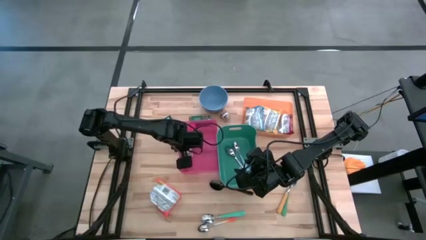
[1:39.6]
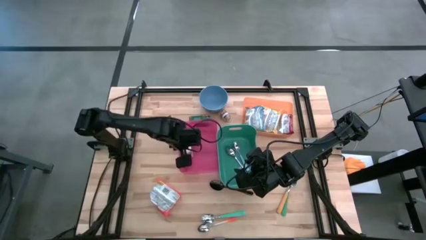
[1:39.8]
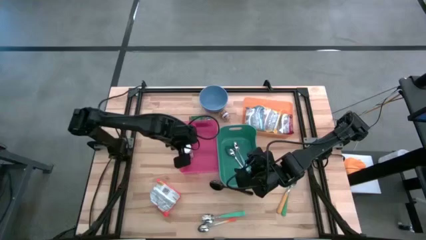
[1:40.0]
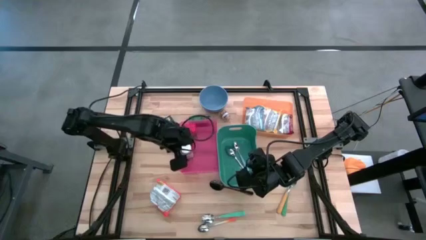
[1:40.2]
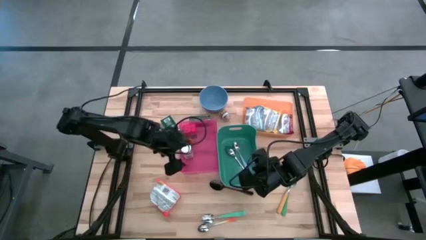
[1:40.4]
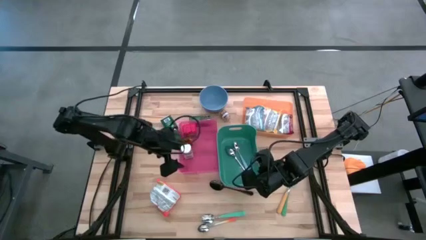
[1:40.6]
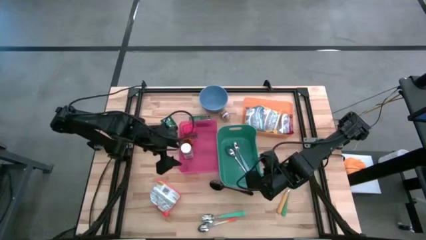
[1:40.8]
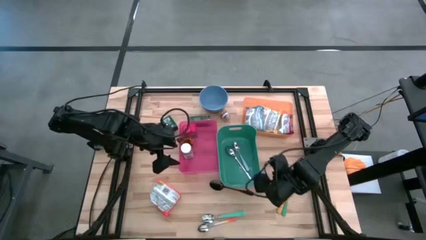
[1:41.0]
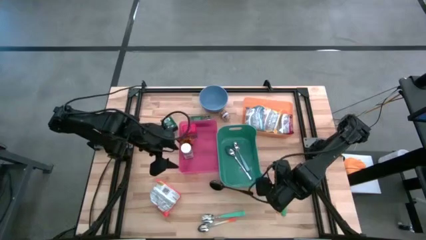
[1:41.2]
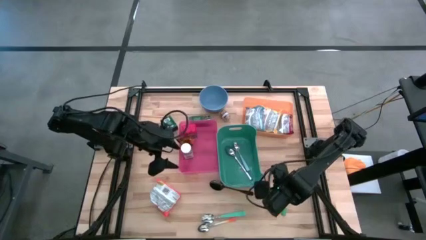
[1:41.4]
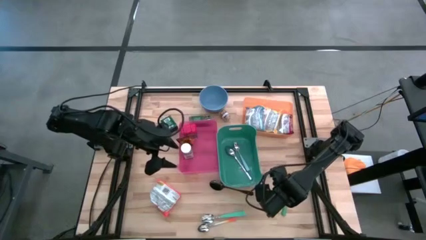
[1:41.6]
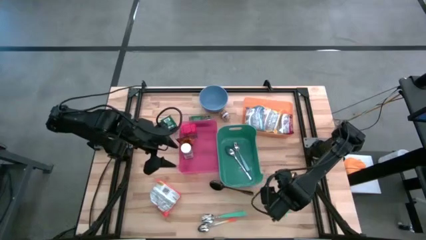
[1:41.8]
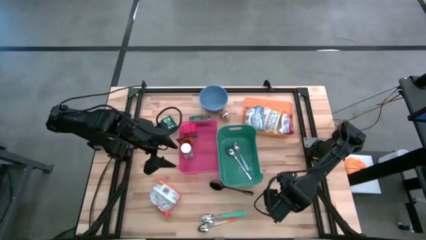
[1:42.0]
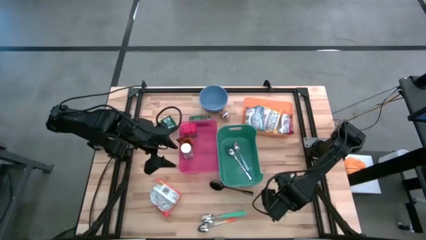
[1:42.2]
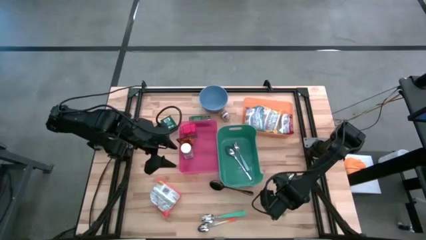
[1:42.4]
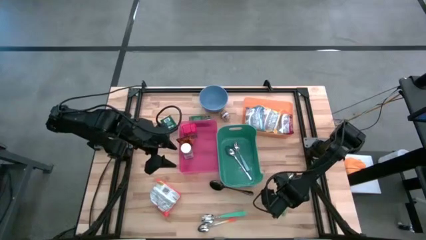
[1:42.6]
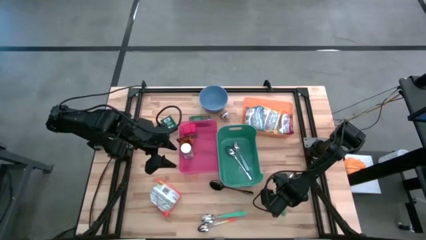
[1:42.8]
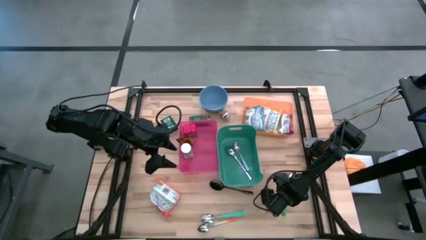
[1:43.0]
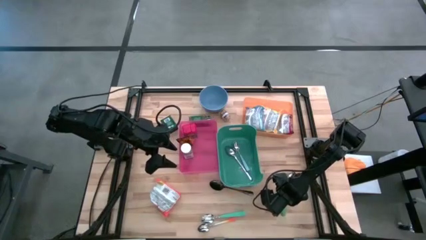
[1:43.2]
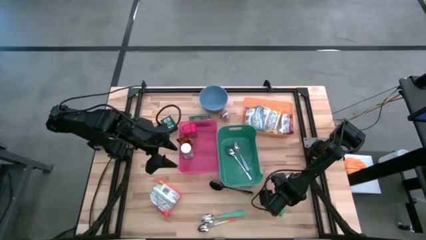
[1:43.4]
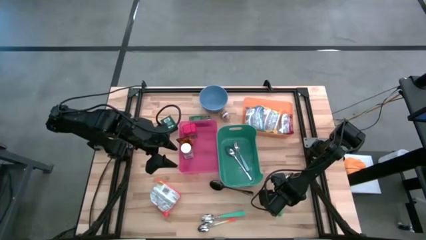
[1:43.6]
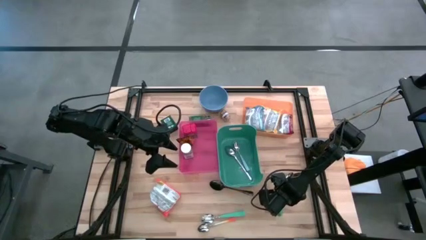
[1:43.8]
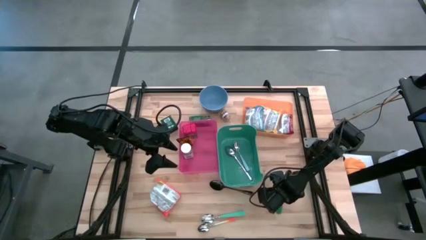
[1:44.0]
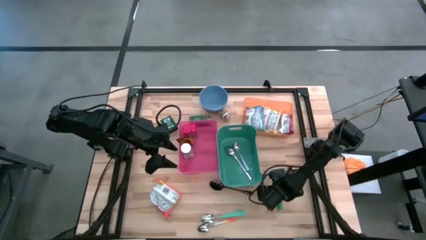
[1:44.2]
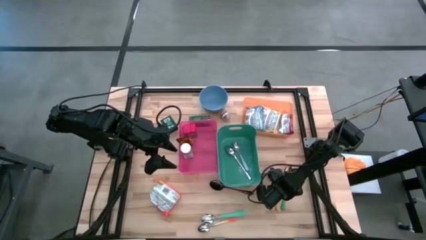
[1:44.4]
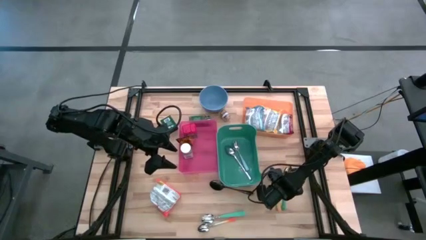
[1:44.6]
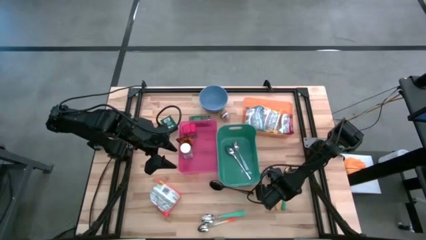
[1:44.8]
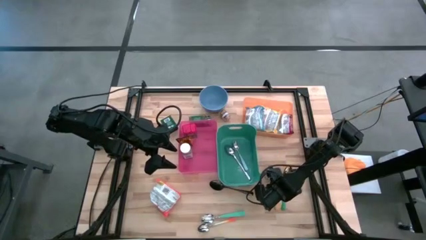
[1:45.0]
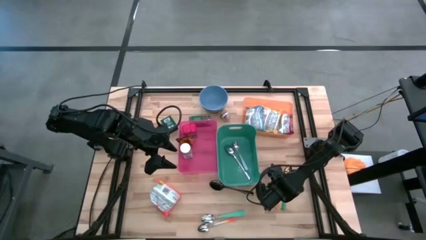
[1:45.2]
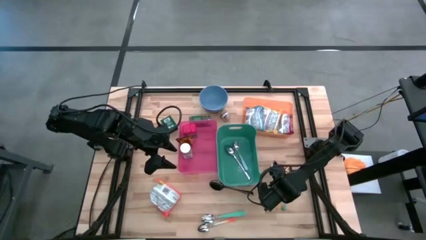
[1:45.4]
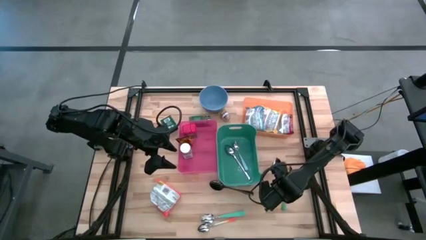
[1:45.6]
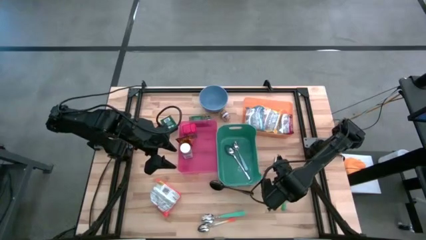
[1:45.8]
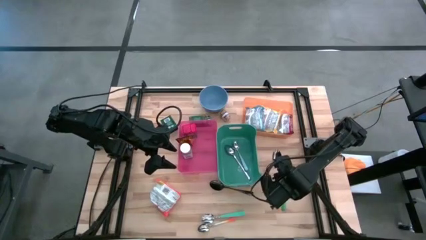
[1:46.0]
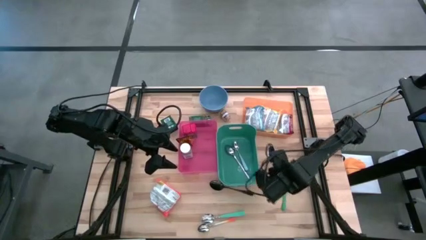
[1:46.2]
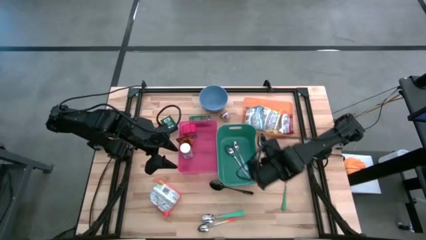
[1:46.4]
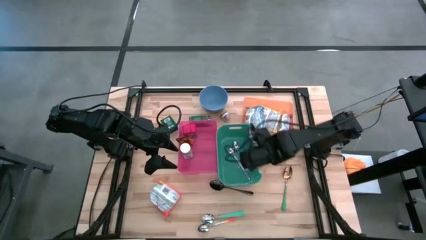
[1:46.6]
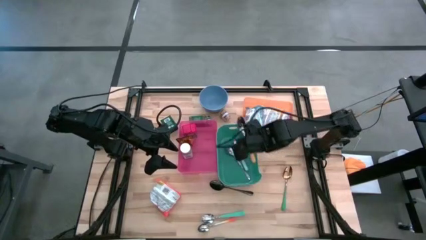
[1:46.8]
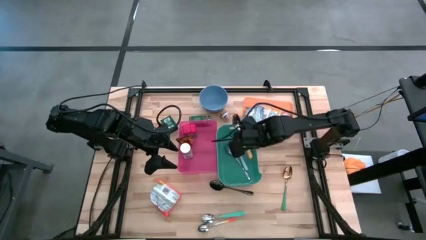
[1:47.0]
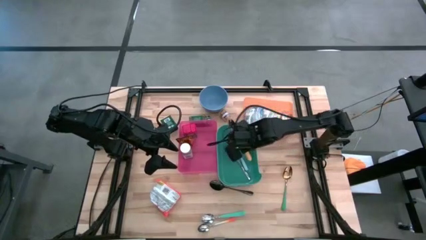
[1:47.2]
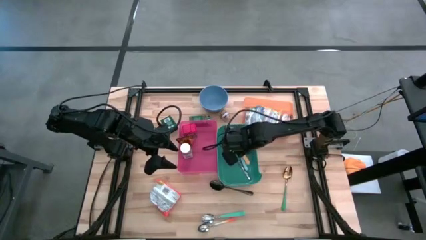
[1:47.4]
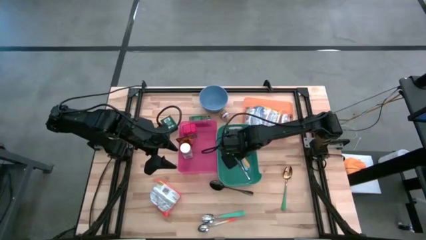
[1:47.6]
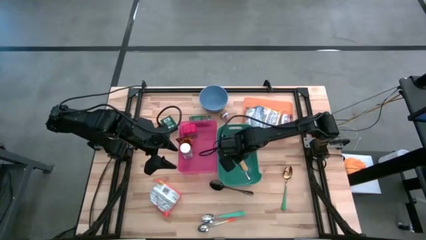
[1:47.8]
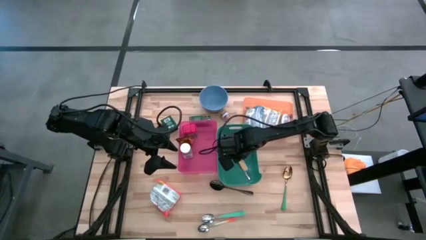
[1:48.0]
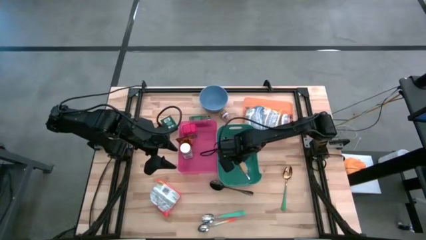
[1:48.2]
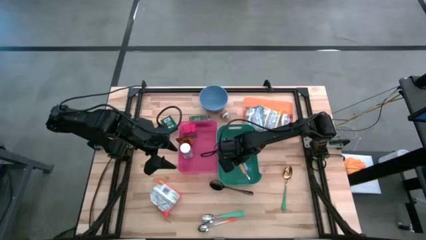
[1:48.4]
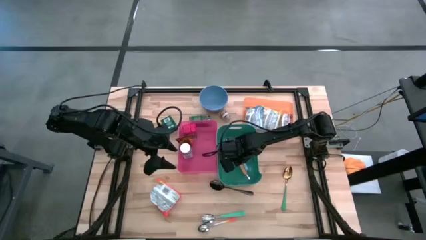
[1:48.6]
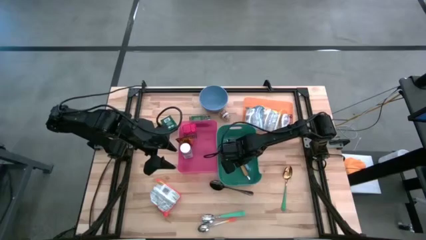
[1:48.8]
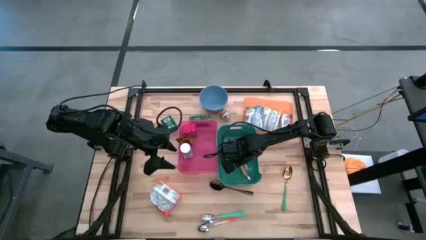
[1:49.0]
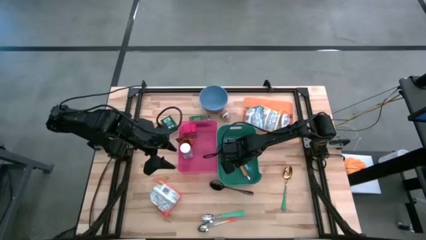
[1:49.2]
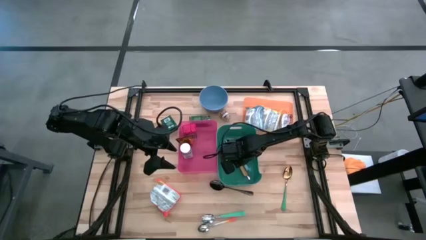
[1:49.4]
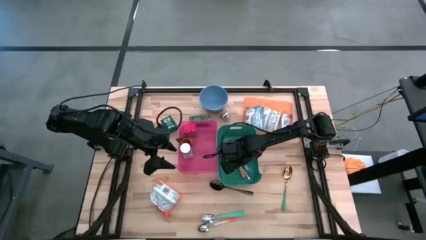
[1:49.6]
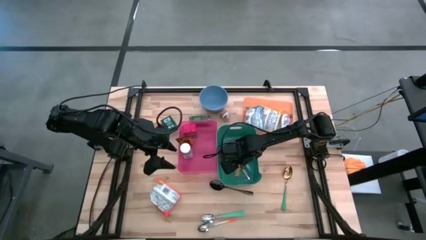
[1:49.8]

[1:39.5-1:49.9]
Put the yellow spoon into the green bin

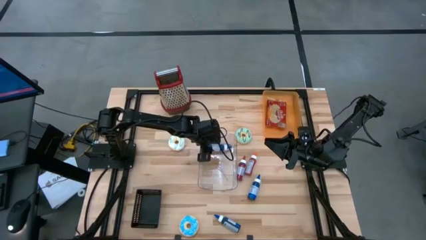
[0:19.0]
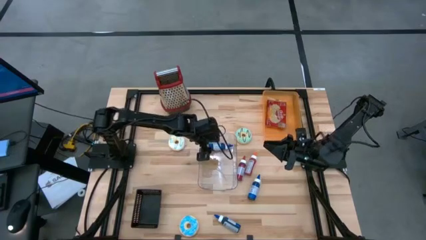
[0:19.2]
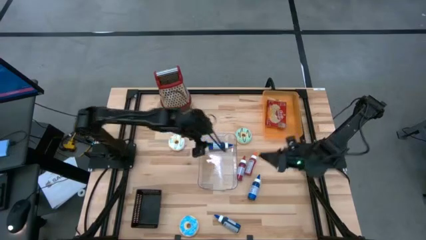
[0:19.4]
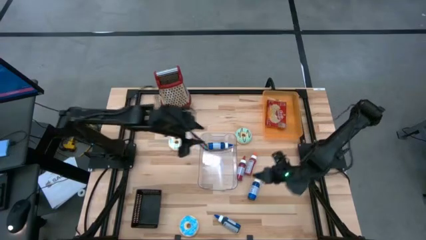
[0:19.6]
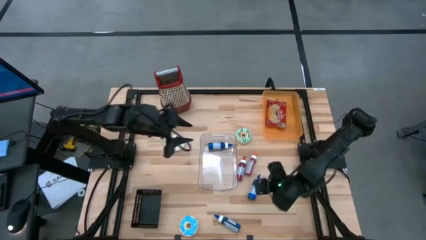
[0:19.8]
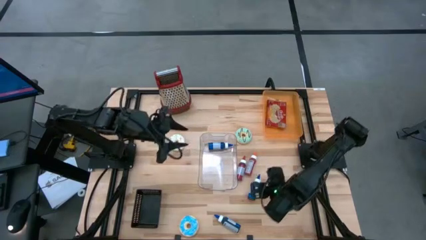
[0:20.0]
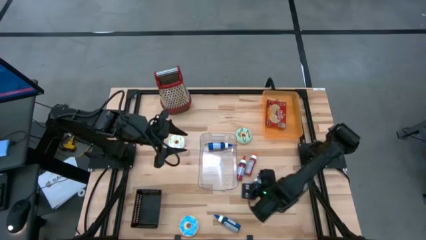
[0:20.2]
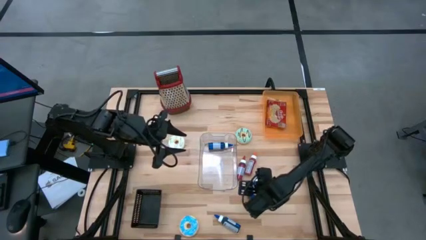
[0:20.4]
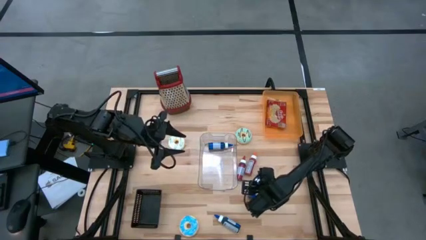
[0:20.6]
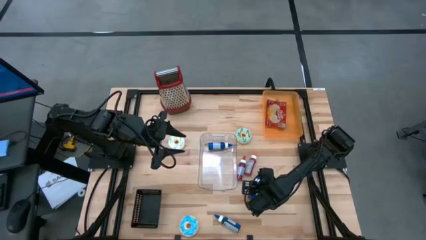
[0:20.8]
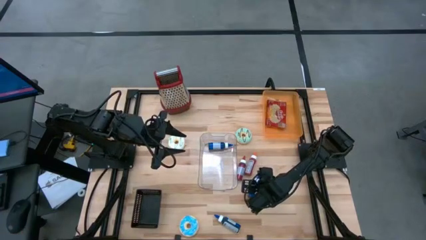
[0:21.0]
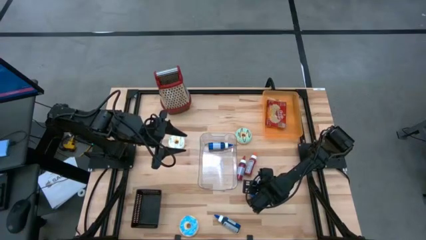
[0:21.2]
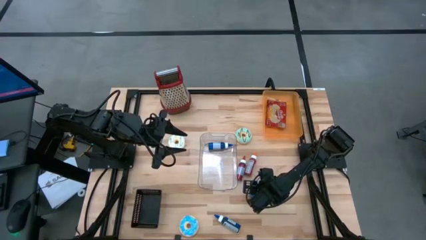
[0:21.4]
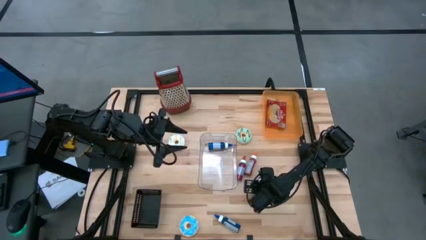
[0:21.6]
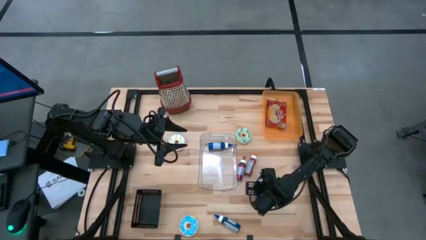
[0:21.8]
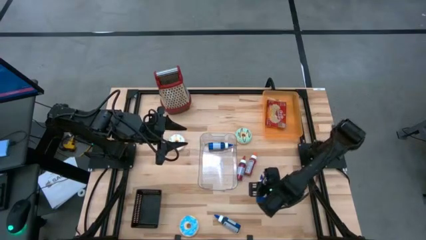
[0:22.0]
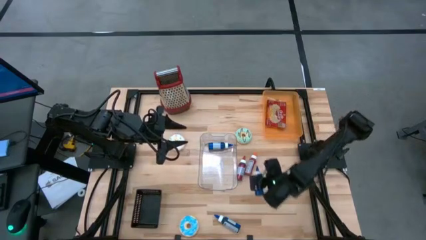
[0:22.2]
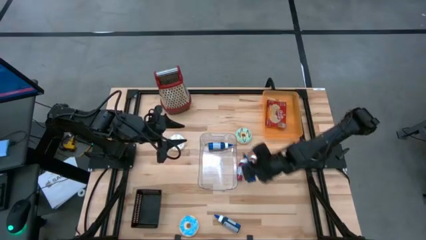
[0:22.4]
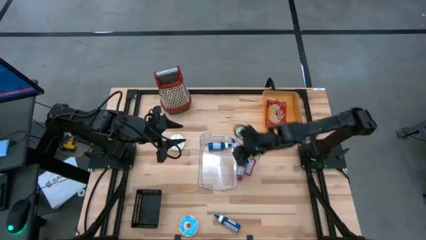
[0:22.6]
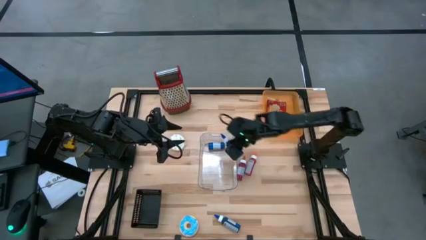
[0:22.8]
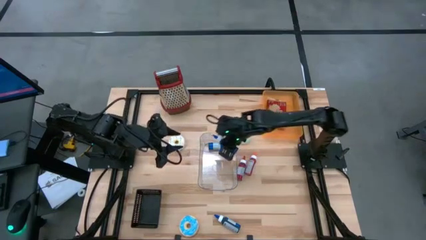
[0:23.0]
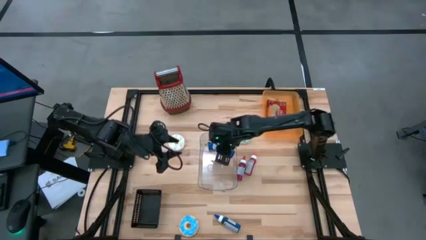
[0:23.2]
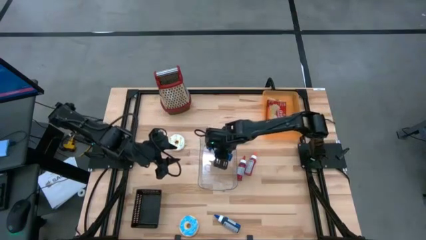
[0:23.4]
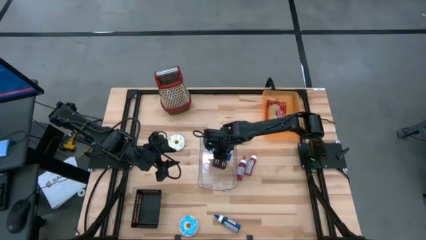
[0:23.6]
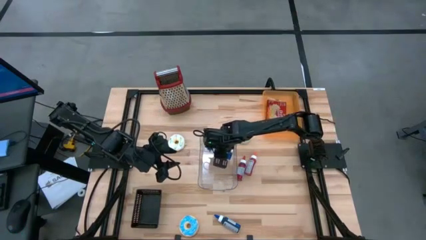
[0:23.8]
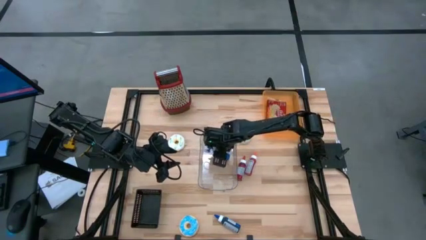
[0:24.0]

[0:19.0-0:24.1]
Put the top blue food coloring bottle into the transparent bin

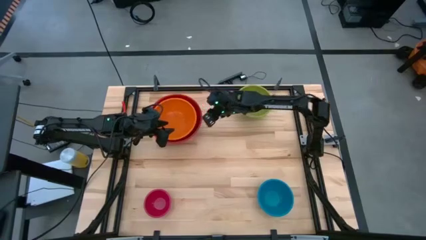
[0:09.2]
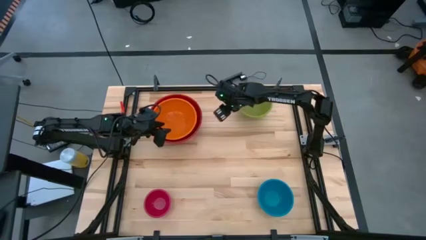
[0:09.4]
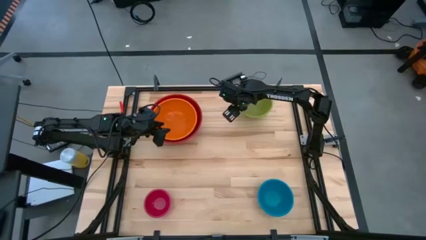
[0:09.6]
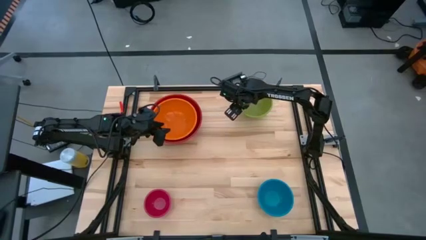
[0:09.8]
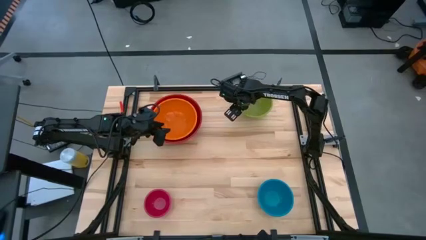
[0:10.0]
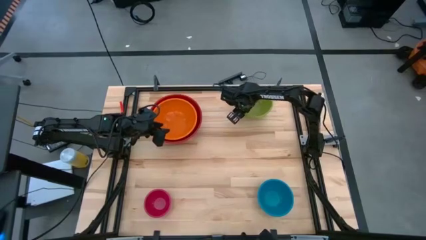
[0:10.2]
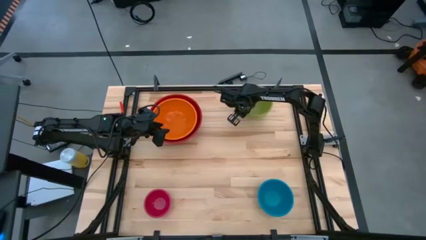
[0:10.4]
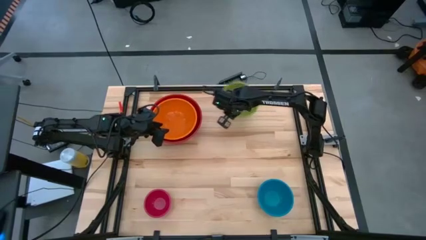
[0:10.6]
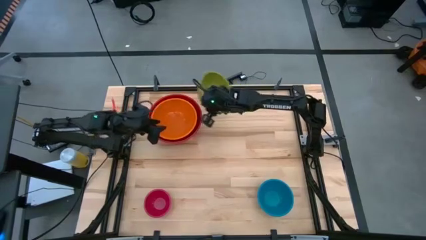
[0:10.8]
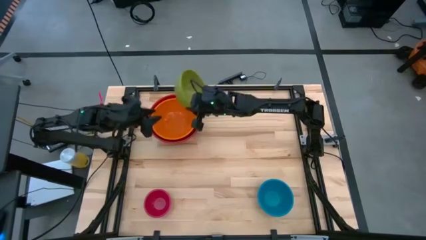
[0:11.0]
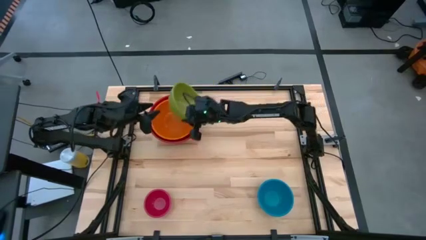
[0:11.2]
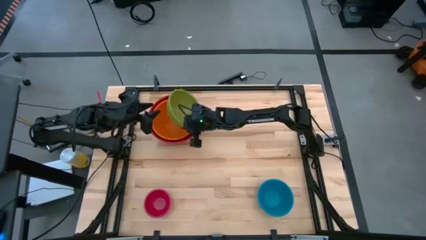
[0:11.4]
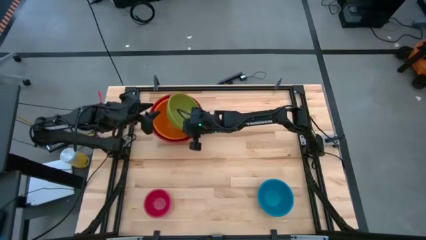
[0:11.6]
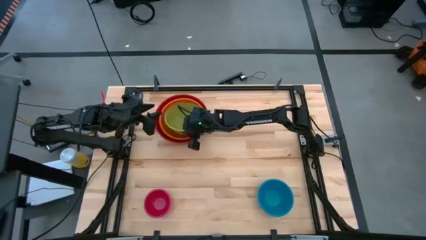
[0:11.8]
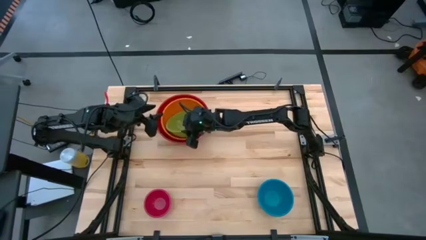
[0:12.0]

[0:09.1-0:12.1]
Stack the green bowl on top of the orange bowl
